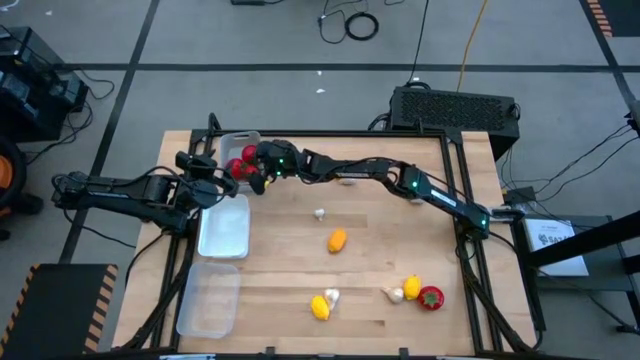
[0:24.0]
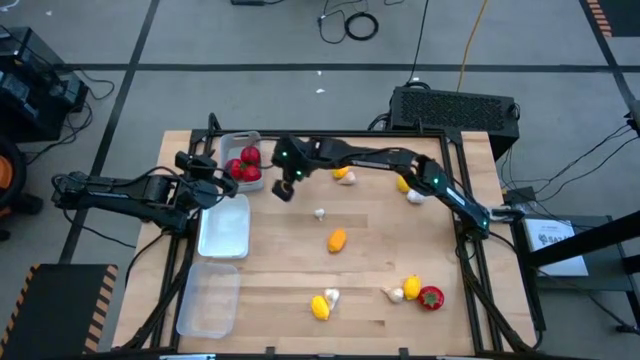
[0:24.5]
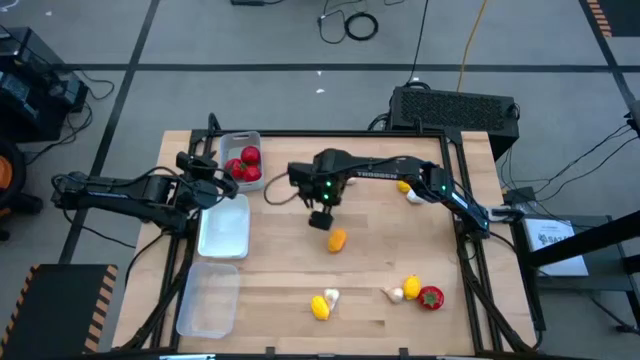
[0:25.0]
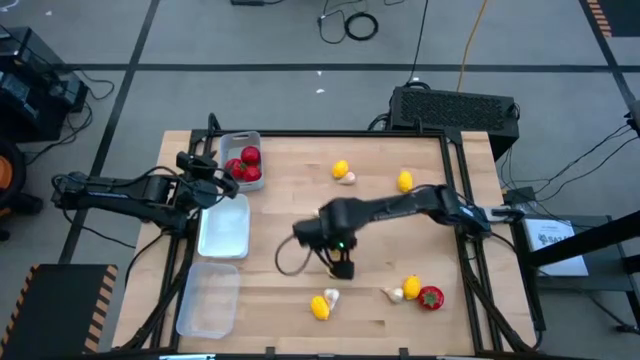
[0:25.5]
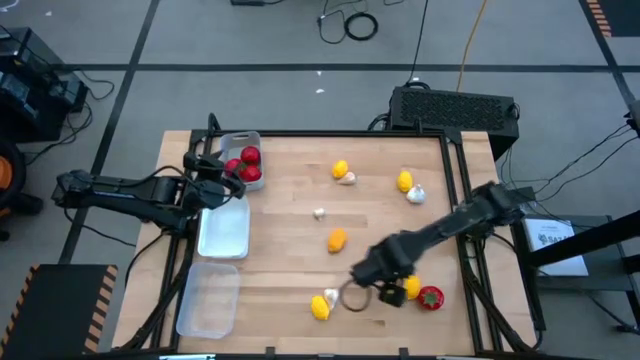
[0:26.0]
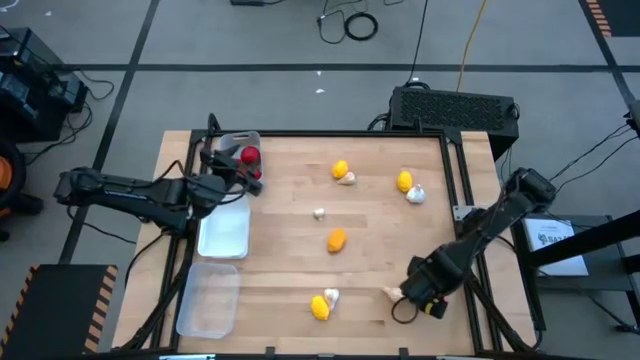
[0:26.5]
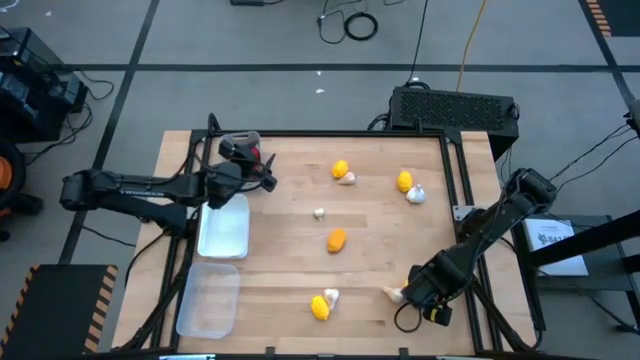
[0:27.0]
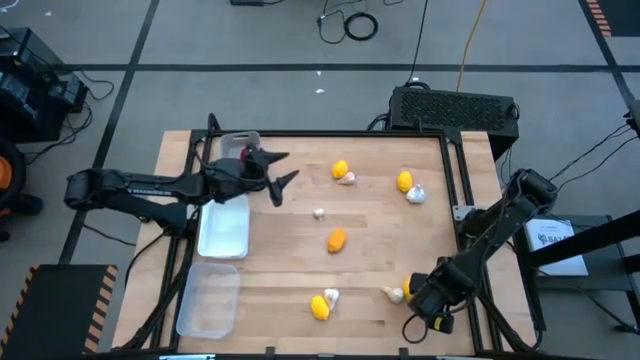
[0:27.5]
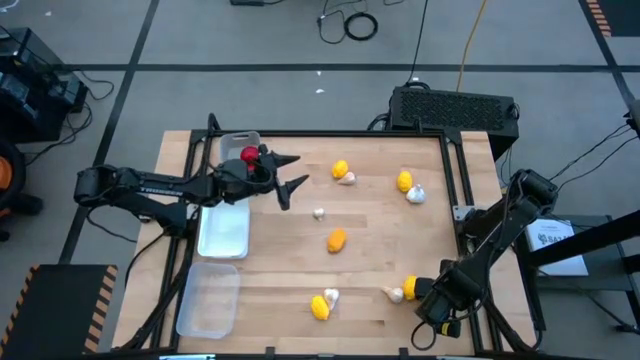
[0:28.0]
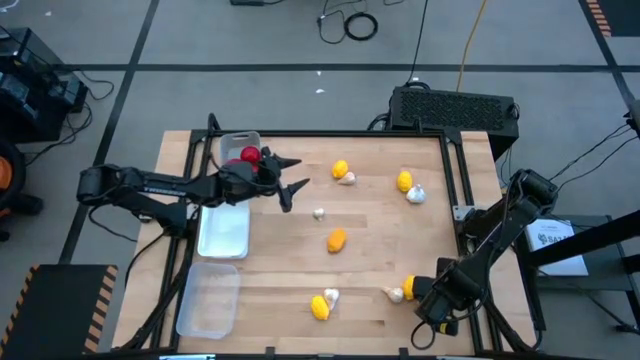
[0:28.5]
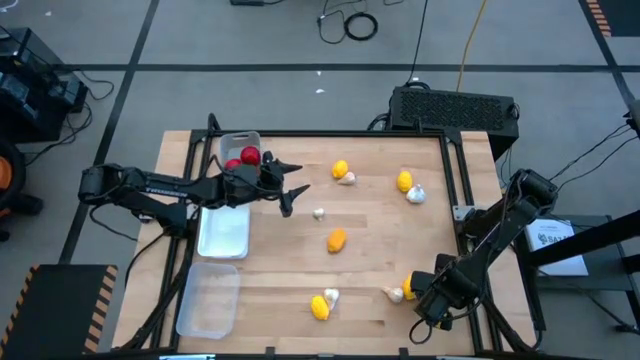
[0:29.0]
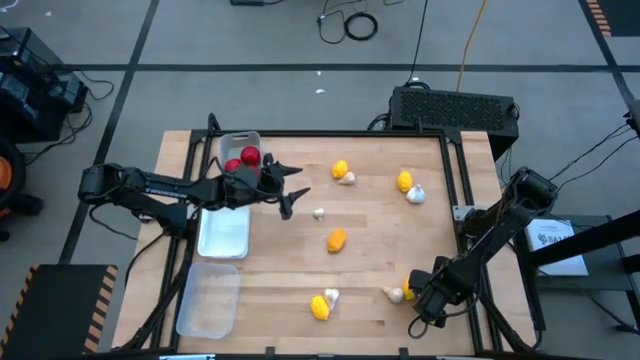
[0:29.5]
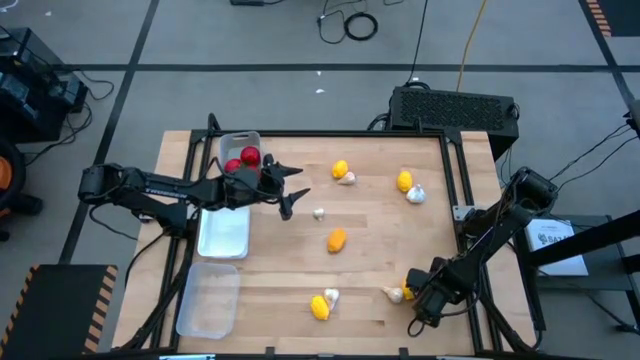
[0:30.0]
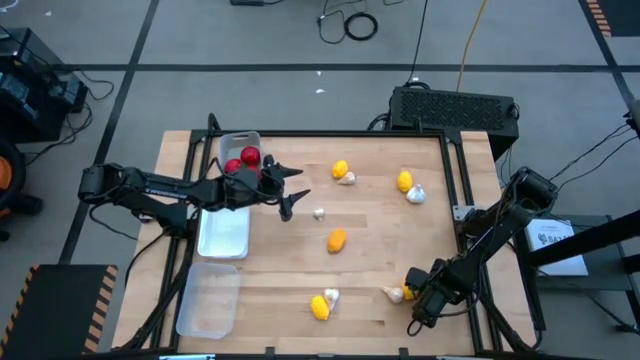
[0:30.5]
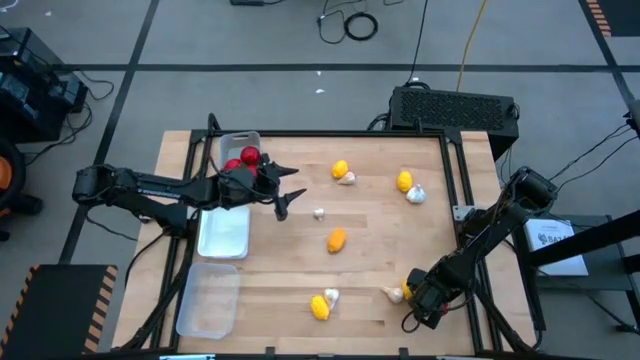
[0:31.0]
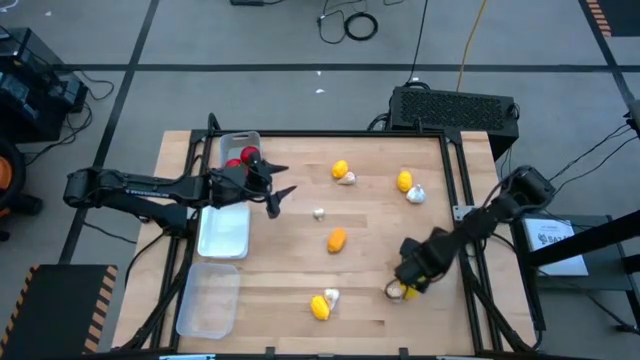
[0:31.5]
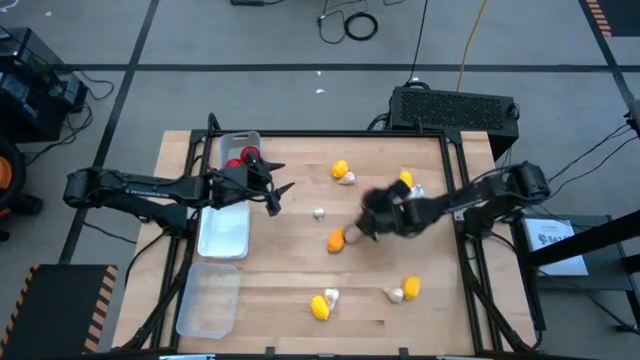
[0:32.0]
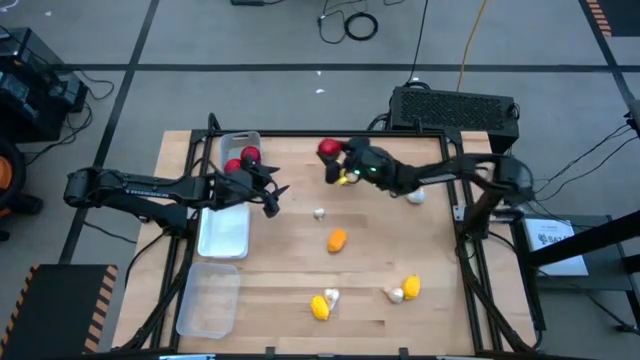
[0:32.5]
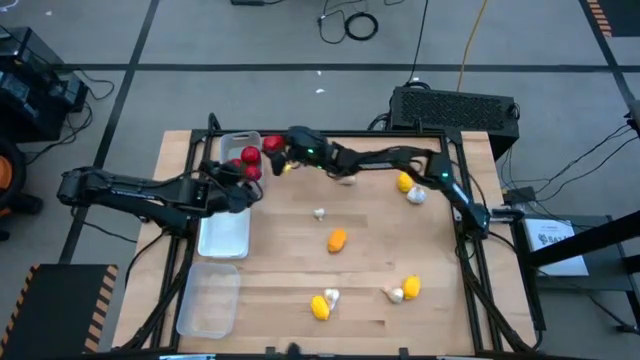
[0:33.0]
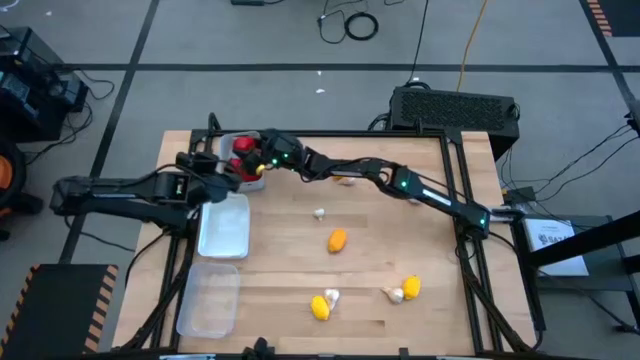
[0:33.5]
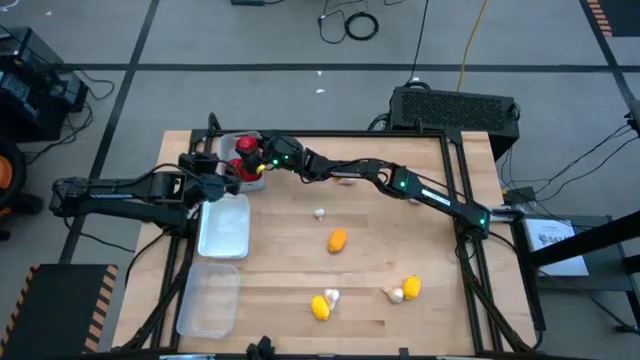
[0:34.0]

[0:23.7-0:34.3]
Task: Sort produce into baskets
Put the tomato into the gray bin

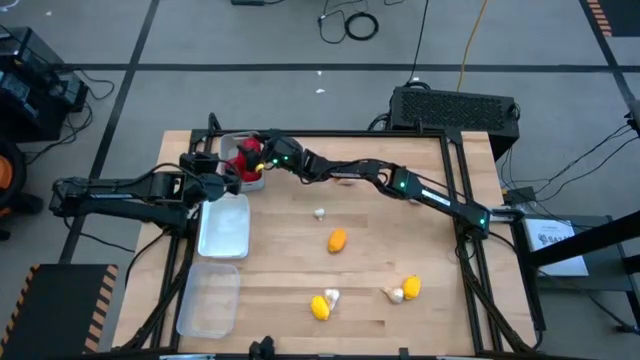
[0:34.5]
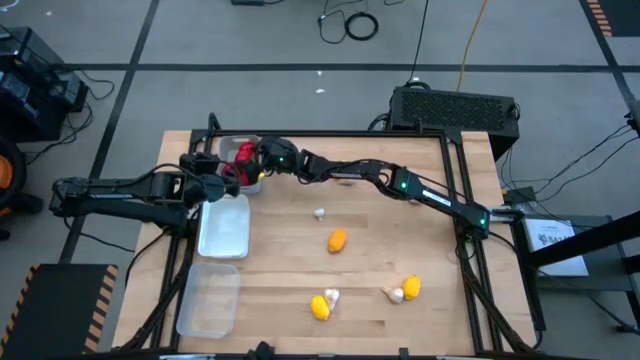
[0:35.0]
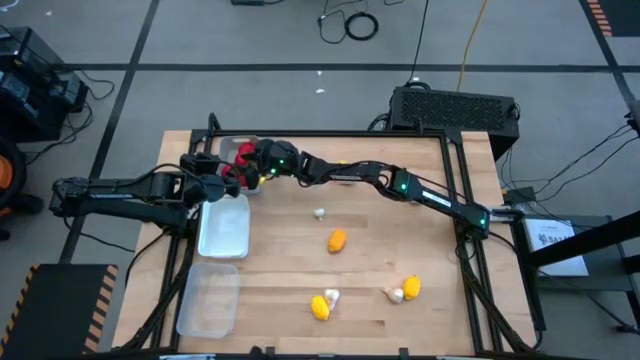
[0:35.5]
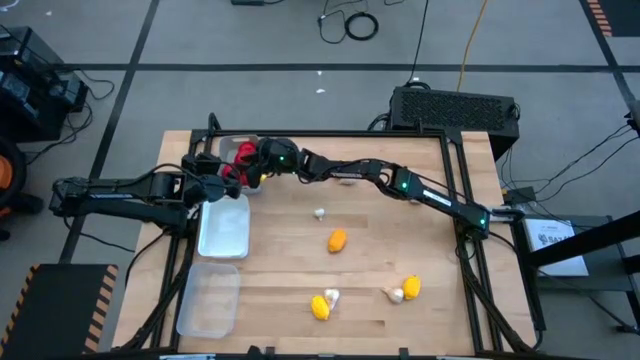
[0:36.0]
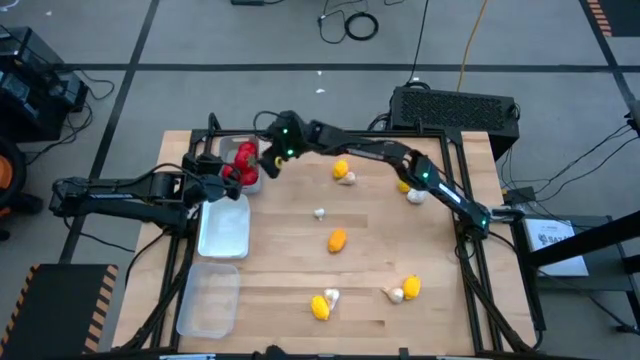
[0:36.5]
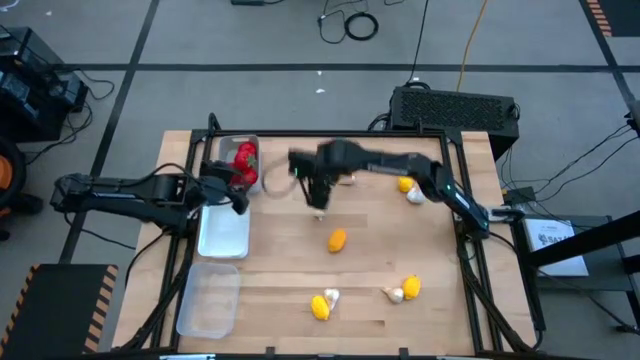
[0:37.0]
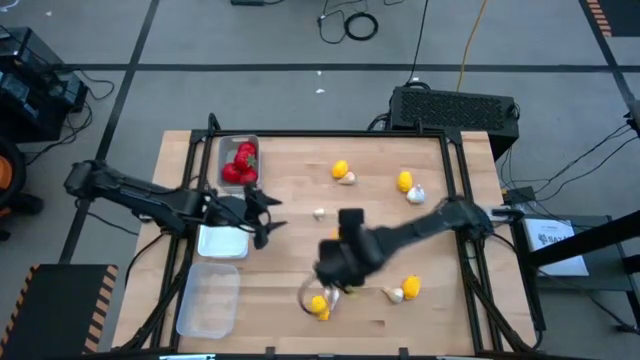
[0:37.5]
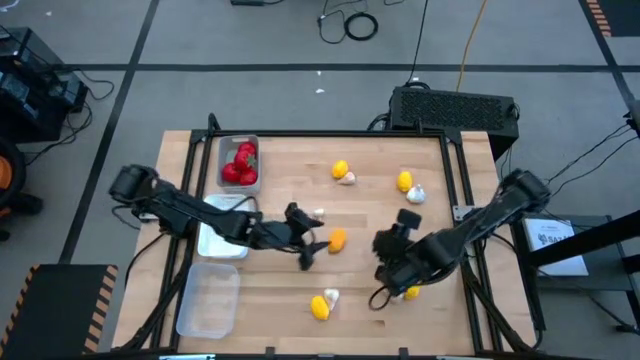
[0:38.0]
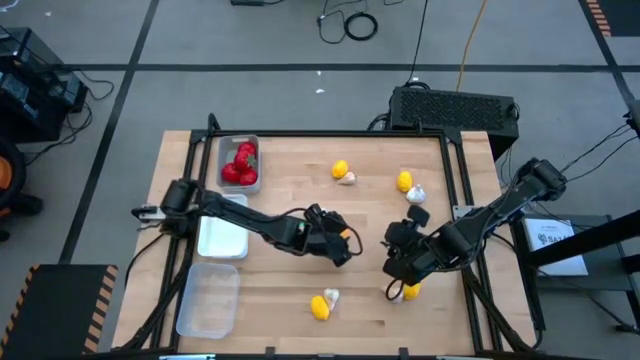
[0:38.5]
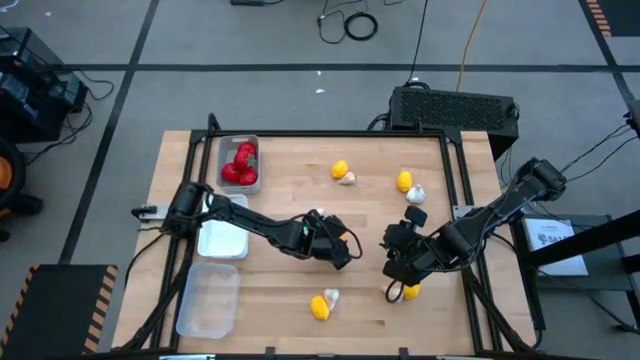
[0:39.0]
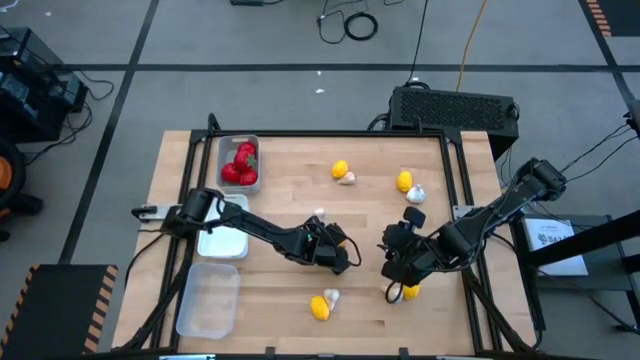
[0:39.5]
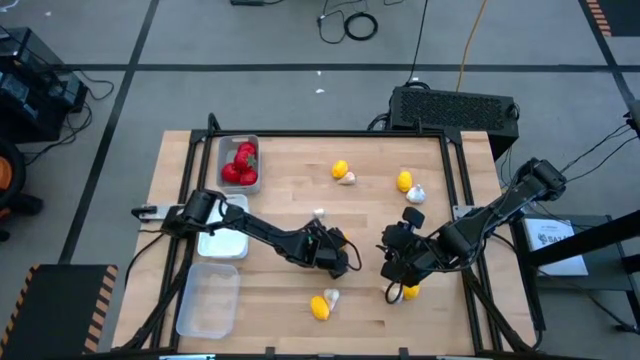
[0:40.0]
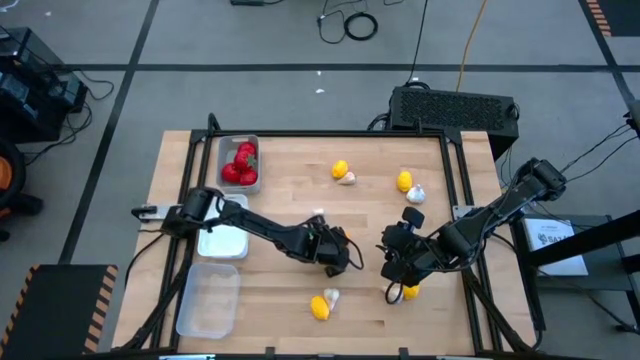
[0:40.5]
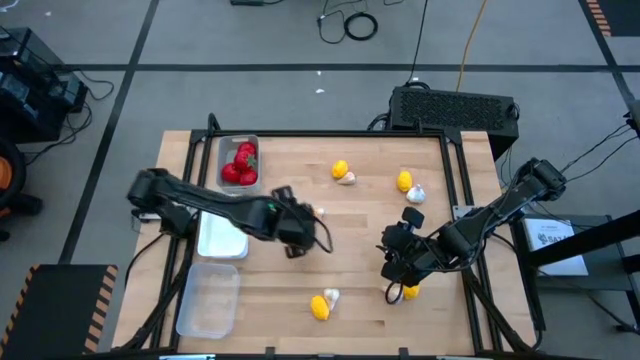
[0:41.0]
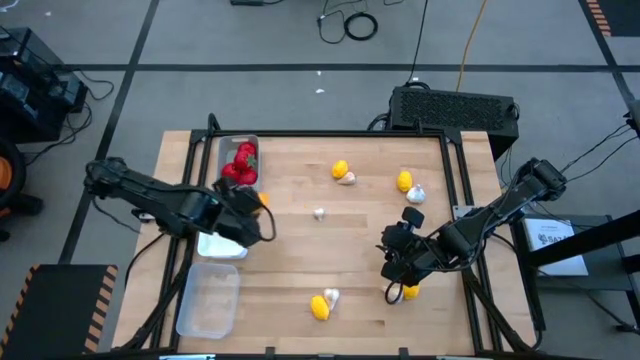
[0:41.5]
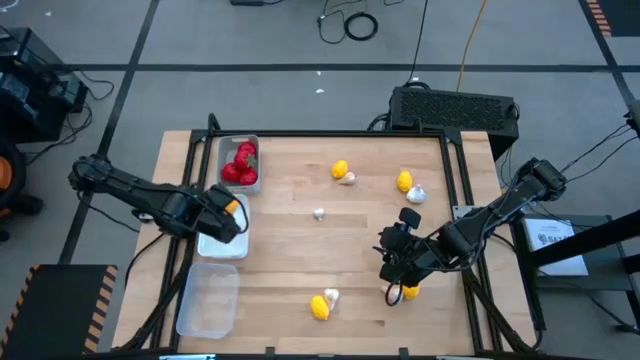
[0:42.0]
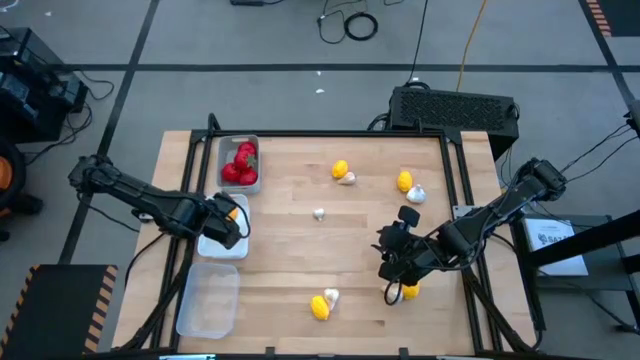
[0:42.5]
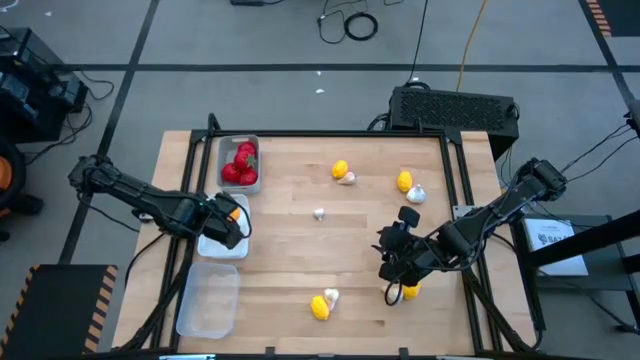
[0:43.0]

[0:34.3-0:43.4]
Put the lemon into the white bin
